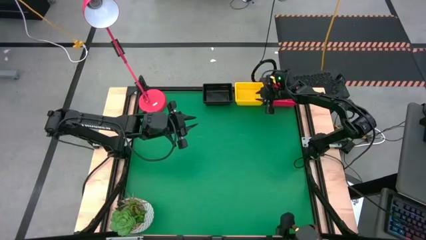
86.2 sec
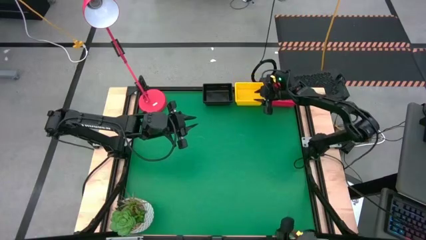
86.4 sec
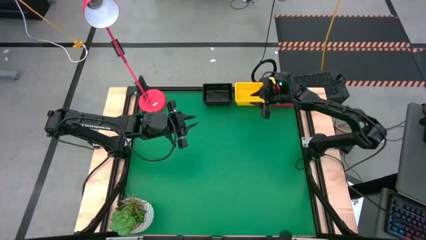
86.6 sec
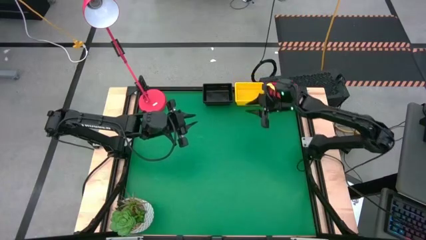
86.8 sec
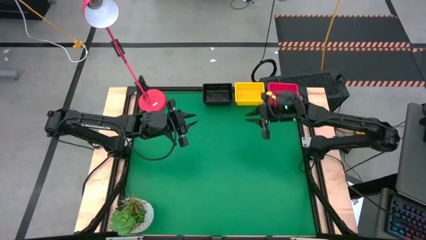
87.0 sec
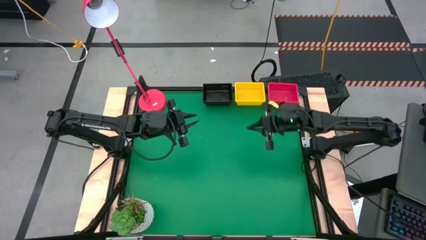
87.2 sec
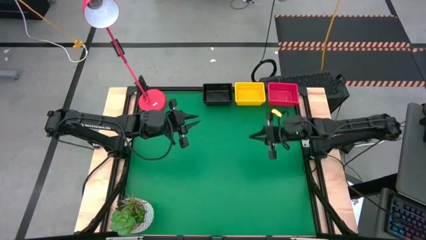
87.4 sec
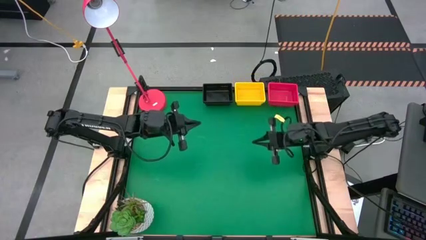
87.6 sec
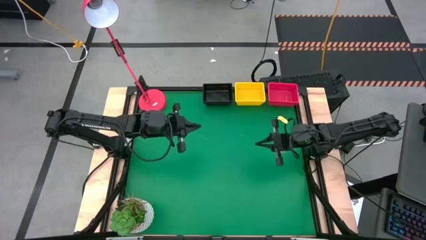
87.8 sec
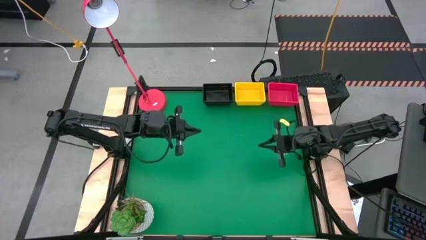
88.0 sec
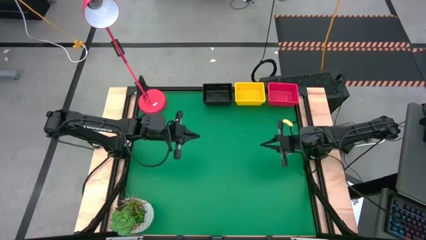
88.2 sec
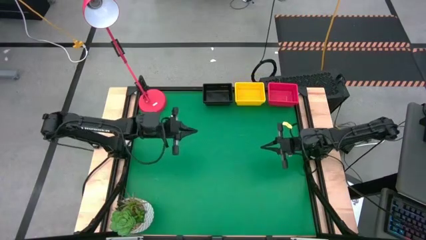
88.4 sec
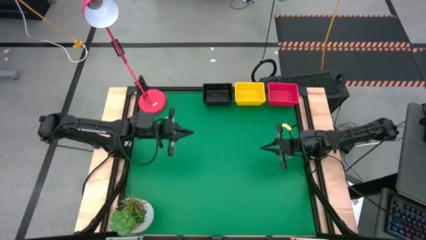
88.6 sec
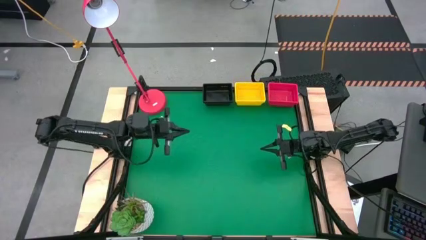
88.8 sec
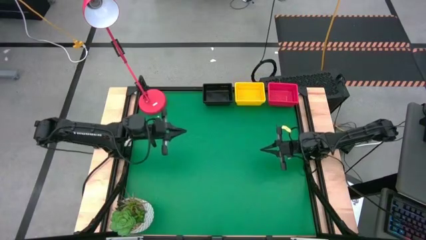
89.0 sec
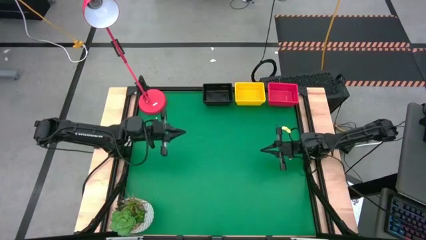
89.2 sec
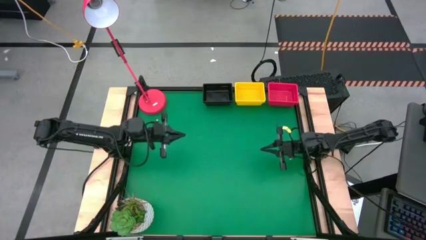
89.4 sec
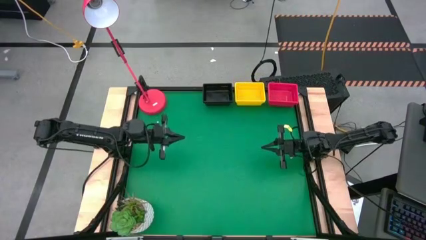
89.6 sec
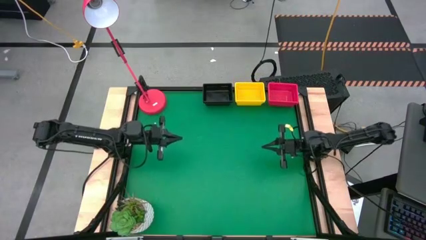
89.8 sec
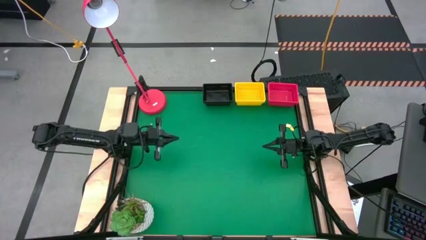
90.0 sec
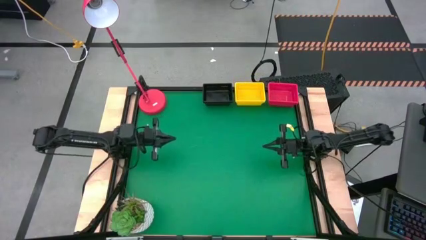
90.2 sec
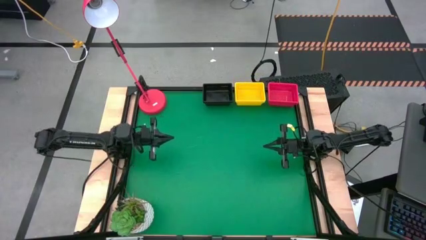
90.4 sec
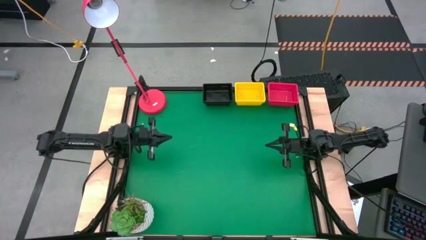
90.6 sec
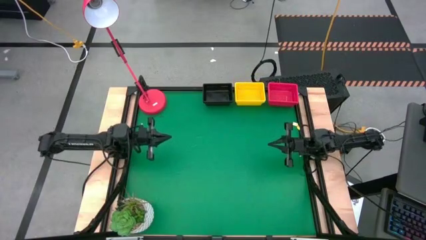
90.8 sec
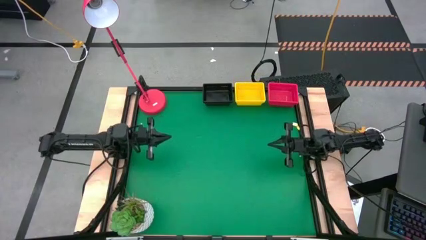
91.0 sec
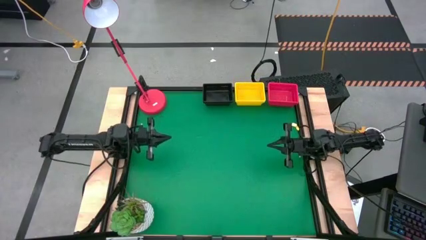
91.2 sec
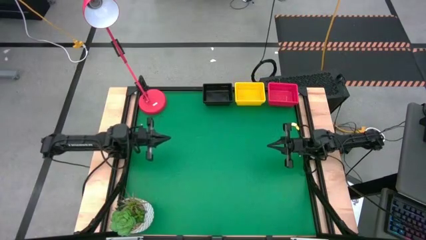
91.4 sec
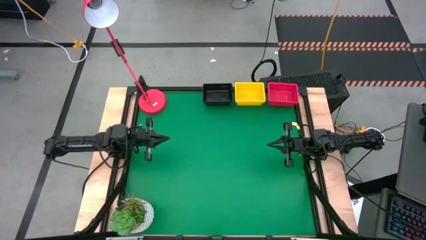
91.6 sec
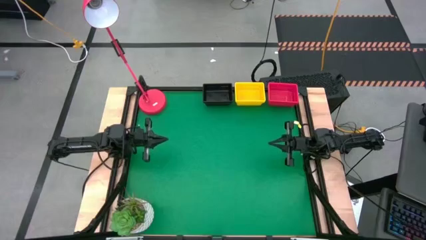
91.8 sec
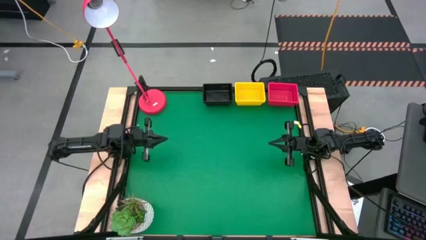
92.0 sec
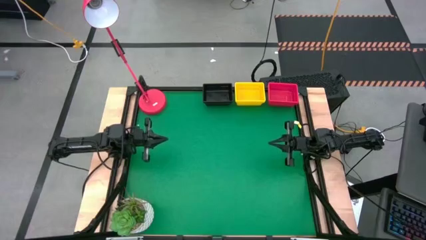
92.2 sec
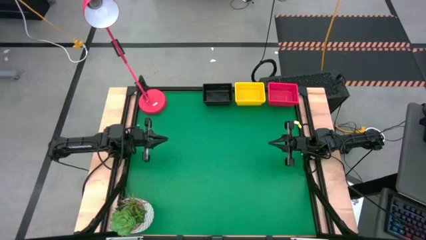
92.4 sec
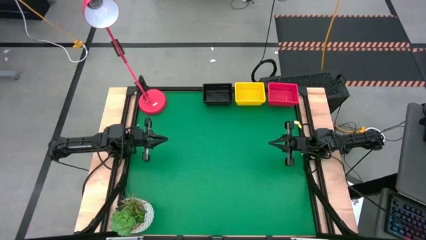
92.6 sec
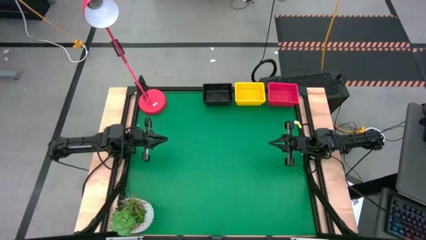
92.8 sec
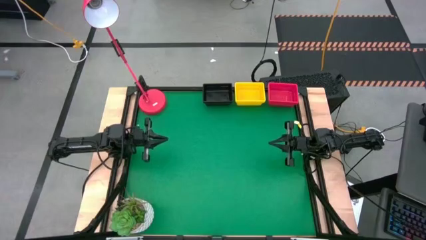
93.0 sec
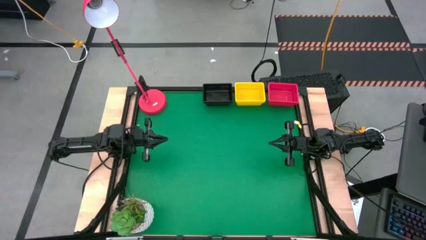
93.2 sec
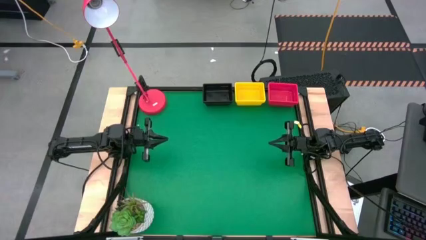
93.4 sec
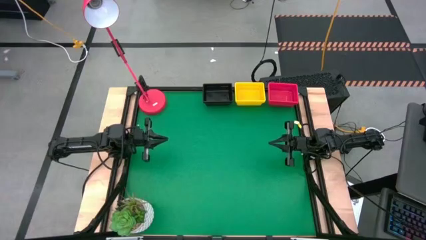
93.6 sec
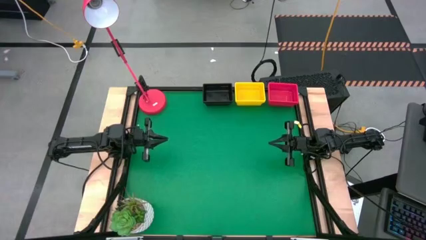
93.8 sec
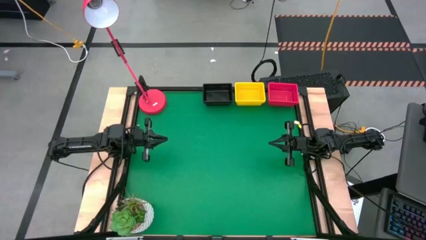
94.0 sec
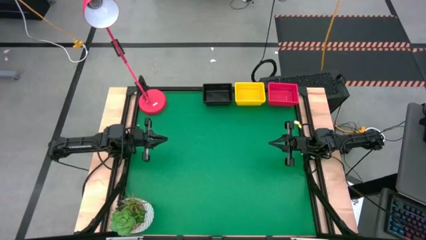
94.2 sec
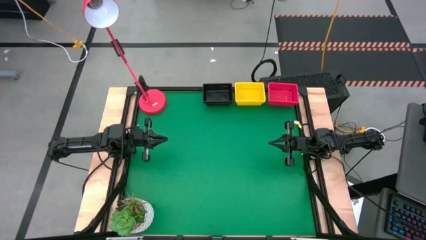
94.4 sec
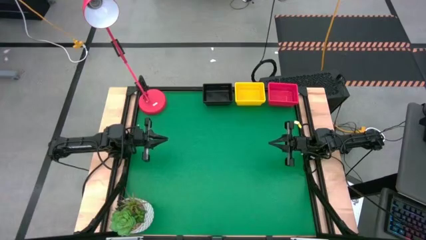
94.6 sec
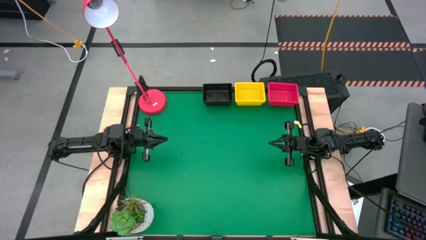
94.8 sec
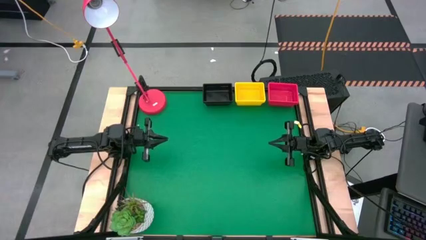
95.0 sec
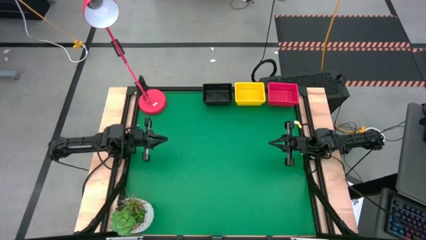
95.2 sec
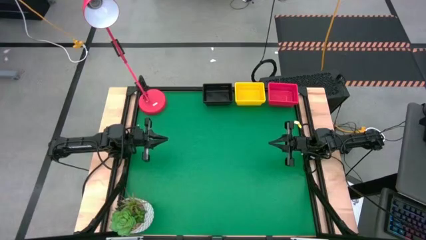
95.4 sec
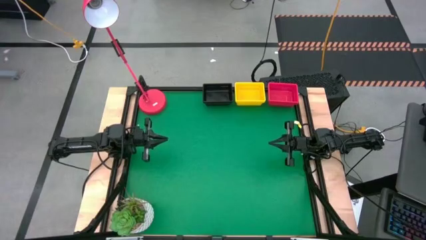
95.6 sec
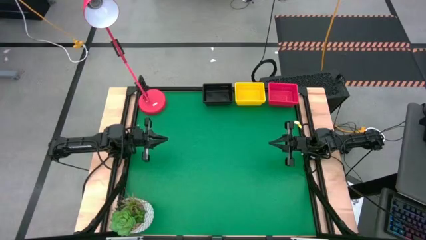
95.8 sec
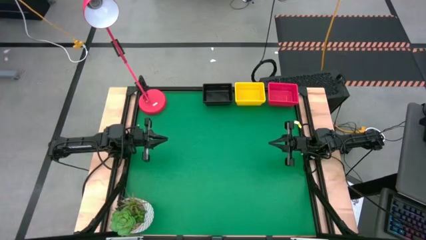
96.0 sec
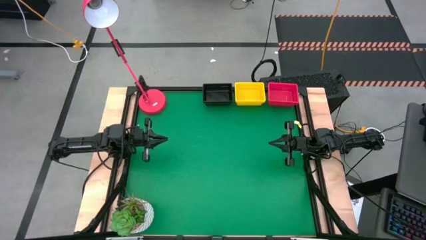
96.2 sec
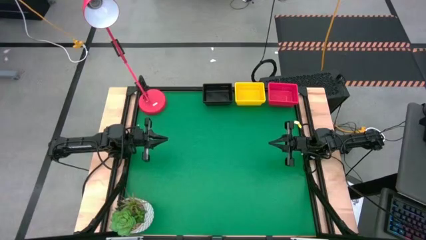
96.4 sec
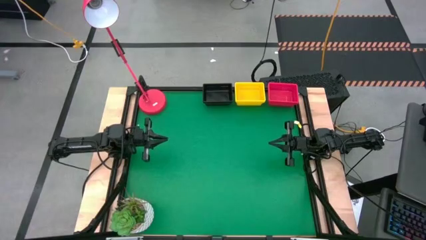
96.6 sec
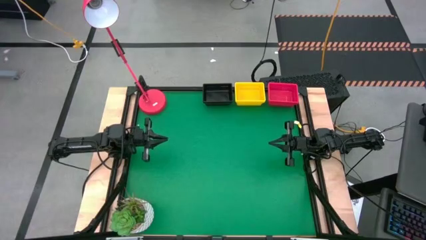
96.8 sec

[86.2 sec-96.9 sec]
Return to Home Position
